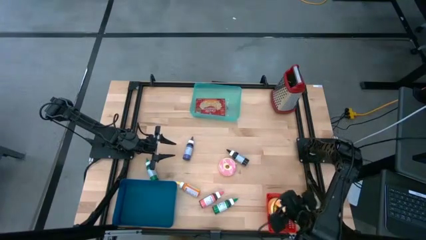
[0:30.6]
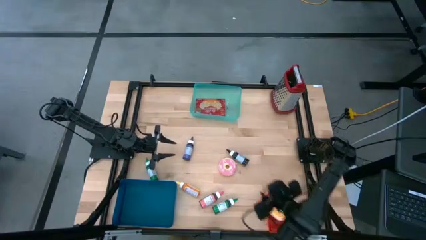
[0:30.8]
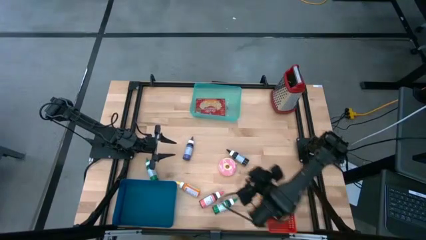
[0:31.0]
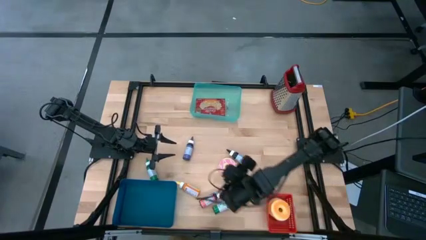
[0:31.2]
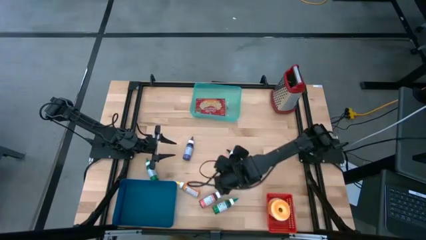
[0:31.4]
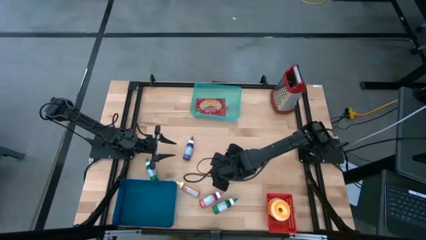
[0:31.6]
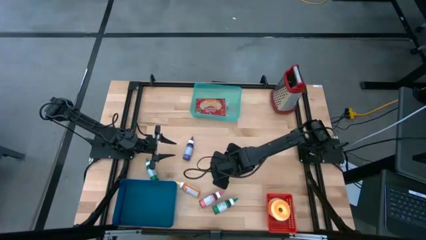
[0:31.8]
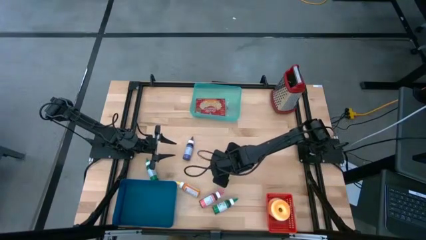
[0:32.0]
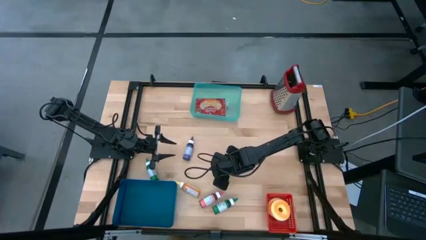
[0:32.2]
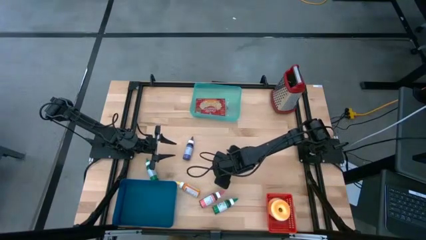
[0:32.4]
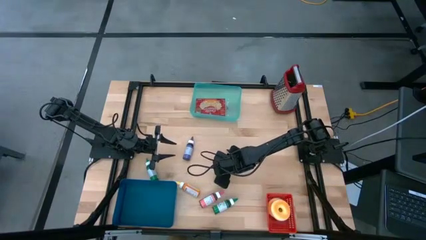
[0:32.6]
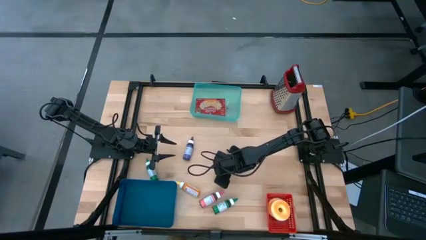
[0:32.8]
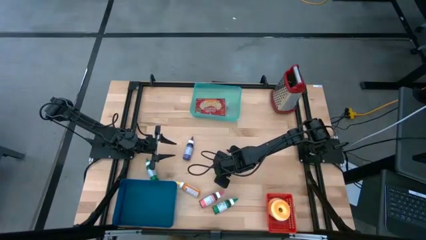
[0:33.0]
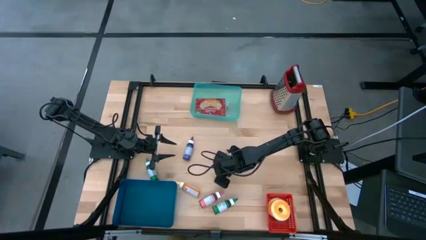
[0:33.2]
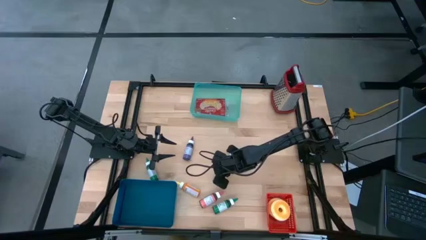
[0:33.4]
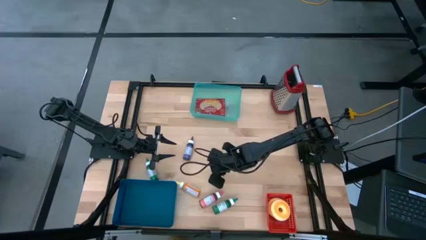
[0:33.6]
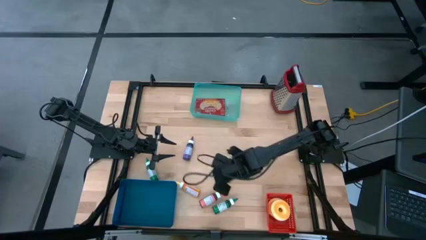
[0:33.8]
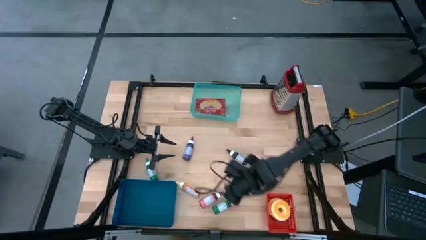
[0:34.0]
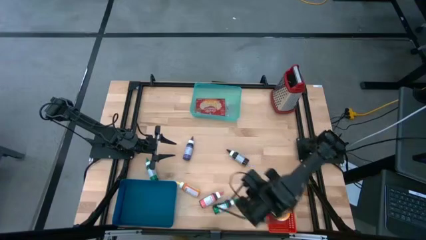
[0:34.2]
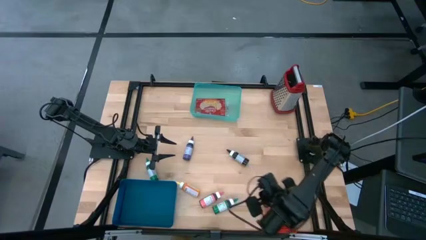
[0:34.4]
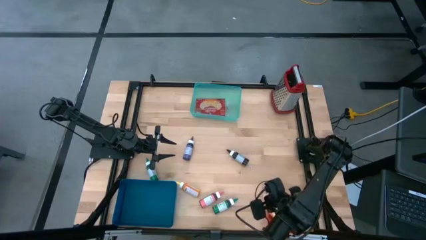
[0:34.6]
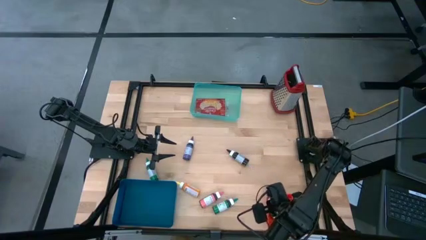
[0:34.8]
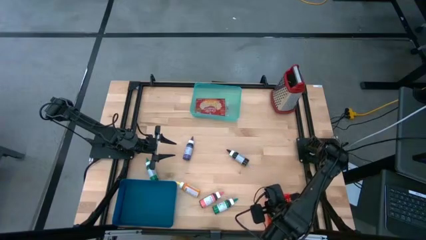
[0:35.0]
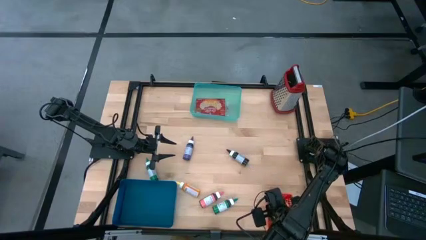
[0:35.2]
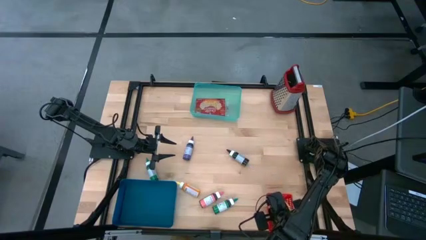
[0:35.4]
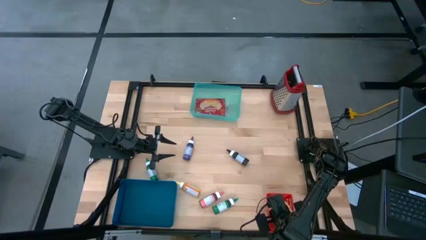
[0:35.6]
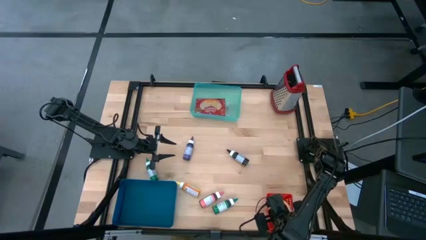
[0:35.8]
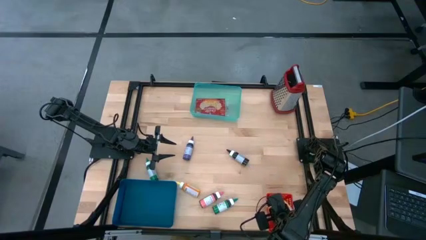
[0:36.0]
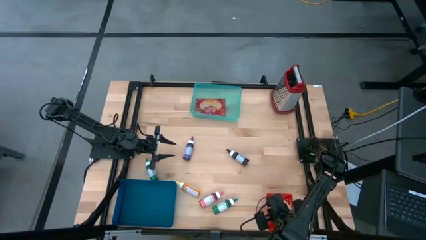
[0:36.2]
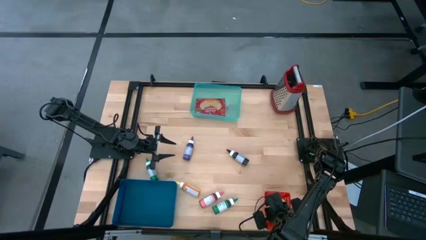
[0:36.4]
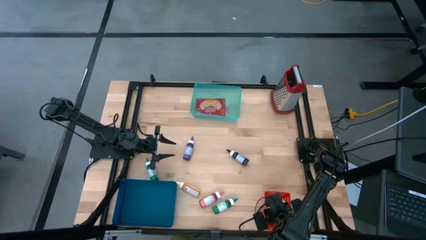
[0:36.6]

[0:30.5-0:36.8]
Put the pink donut into the red bin

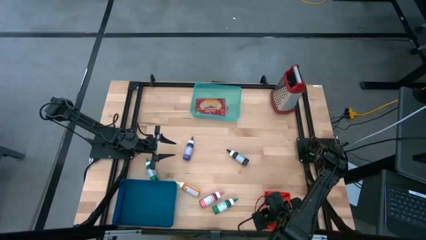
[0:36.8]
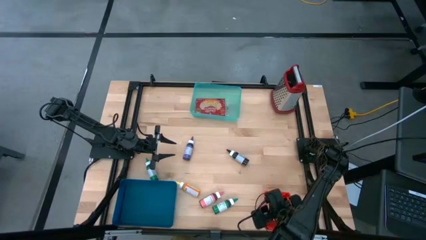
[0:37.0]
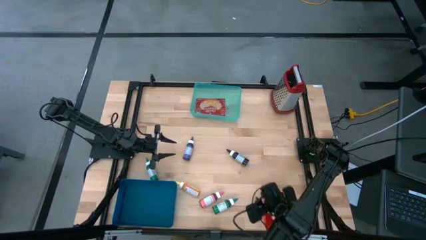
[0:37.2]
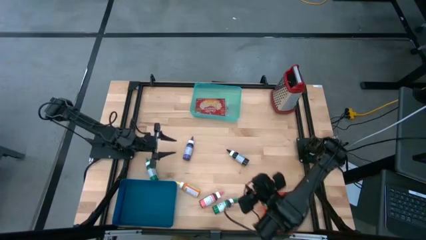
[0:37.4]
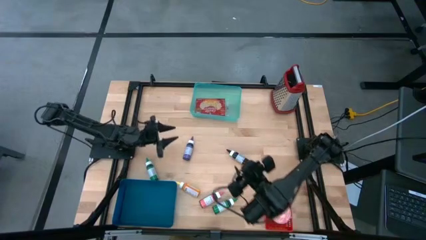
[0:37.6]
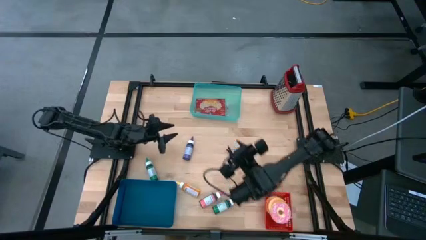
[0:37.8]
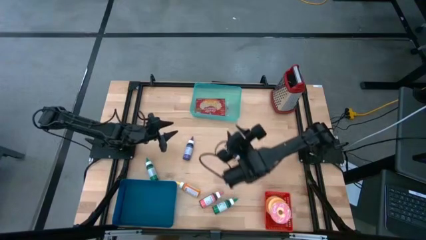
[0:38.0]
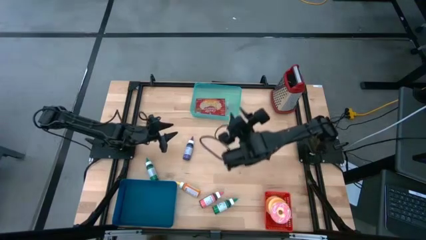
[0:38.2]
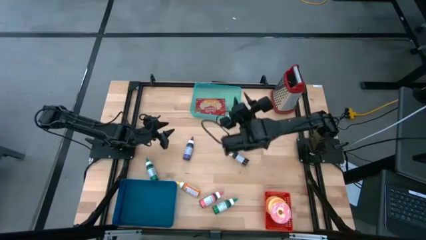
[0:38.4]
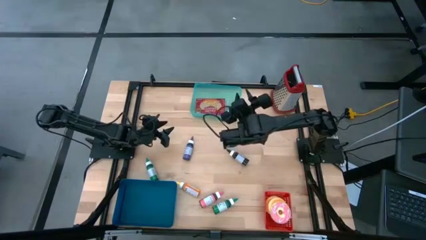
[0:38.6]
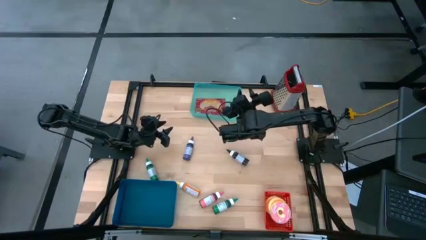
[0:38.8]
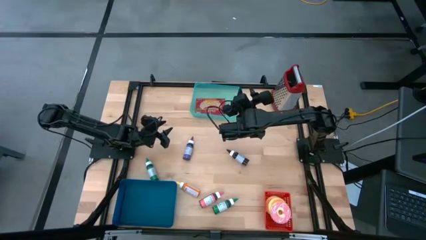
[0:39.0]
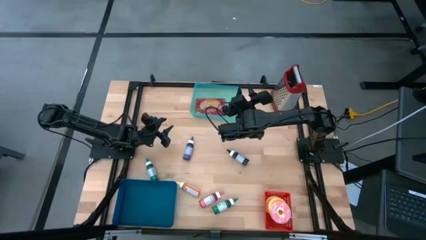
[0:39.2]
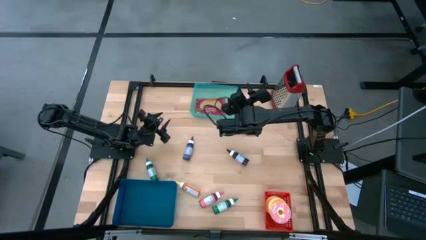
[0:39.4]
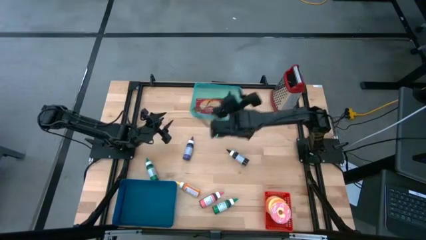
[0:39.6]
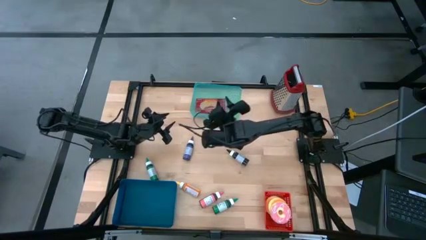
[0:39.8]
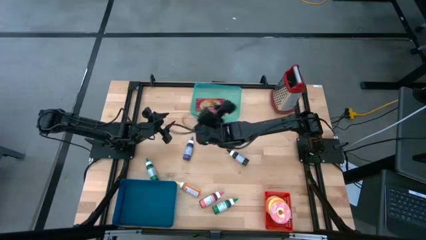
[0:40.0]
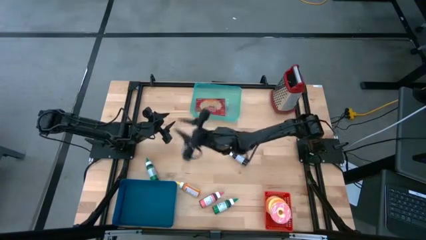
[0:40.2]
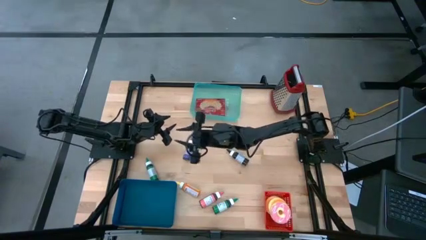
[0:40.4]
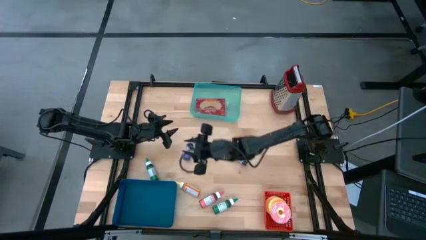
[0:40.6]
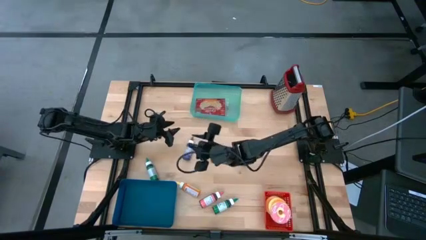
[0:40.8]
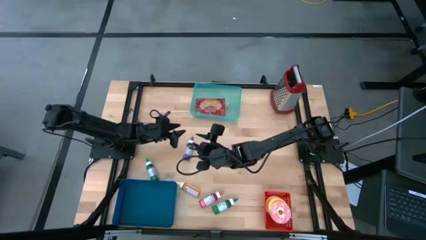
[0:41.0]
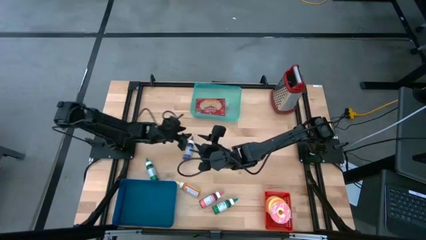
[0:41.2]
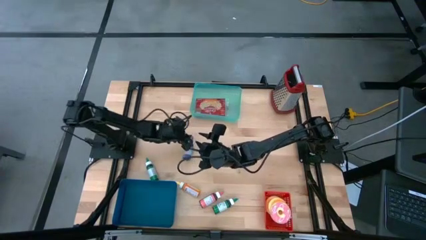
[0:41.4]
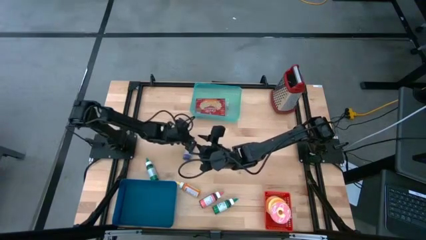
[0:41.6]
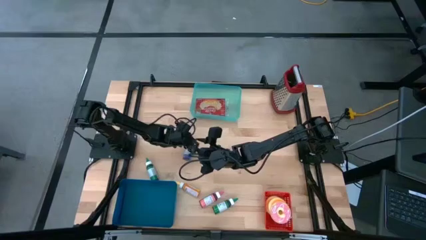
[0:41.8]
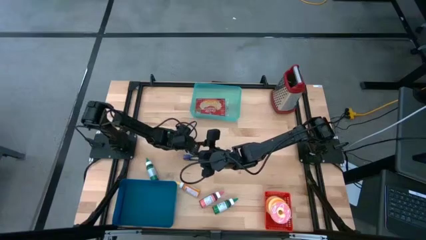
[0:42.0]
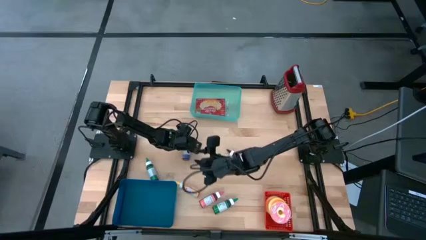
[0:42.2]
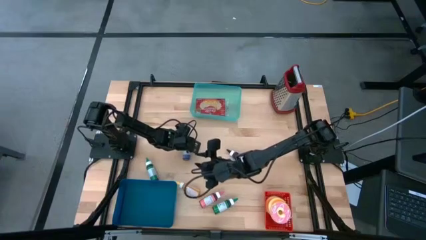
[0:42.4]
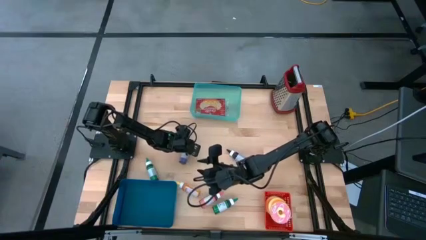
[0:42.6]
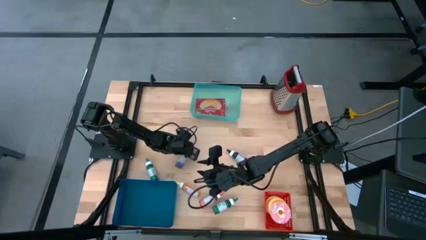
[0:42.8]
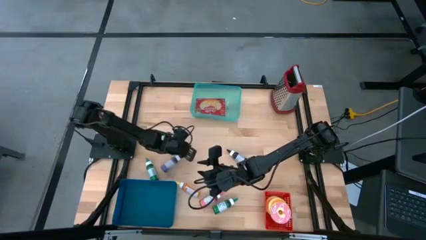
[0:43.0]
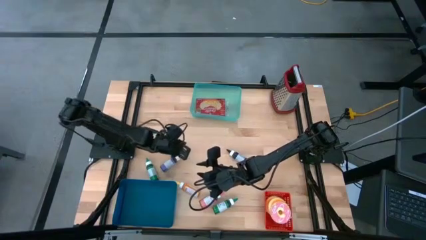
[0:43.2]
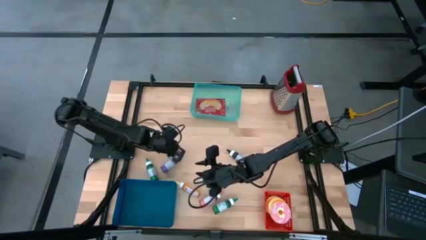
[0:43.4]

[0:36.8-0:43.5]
Put the purple food coloring bottle into the dark blue bin

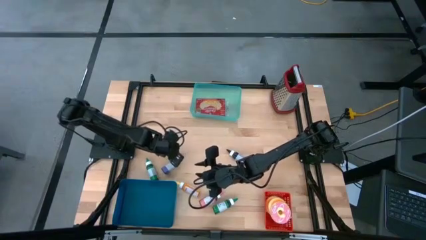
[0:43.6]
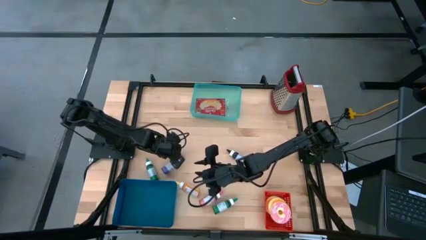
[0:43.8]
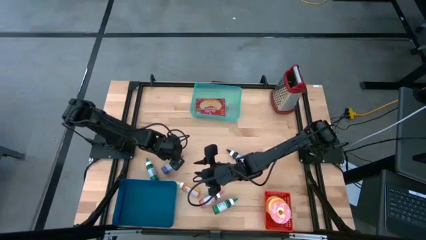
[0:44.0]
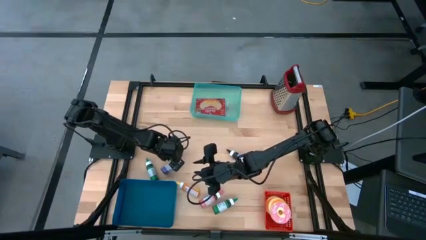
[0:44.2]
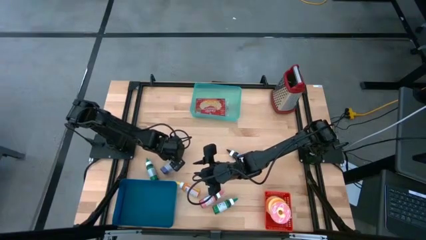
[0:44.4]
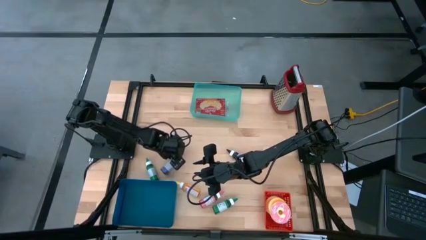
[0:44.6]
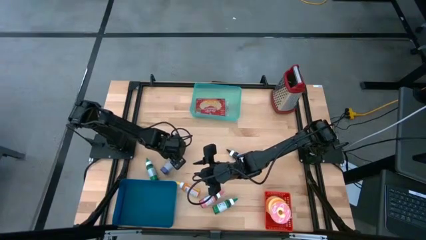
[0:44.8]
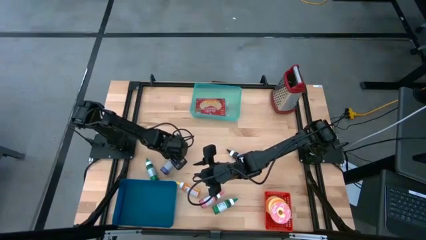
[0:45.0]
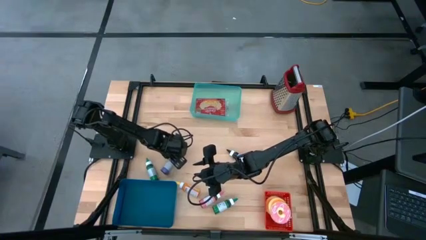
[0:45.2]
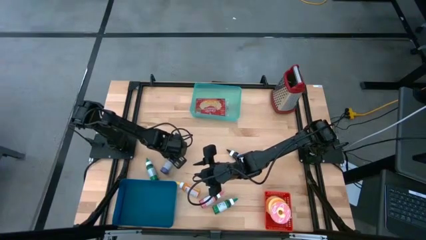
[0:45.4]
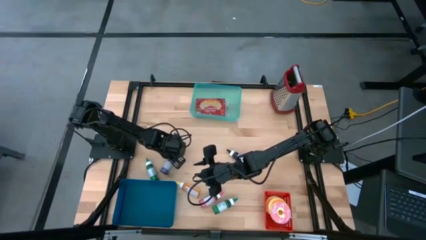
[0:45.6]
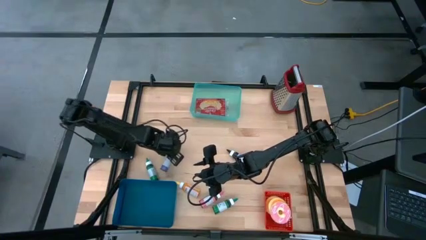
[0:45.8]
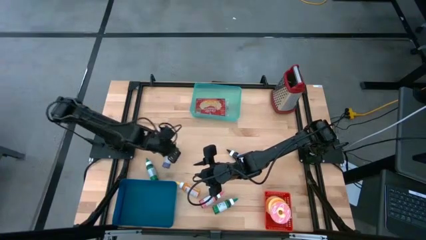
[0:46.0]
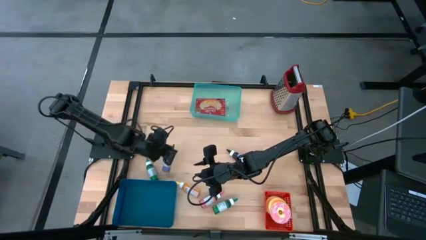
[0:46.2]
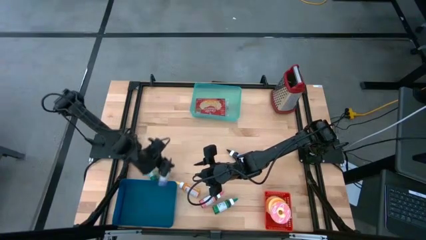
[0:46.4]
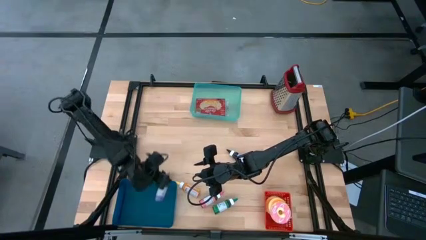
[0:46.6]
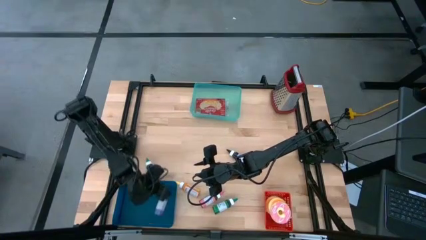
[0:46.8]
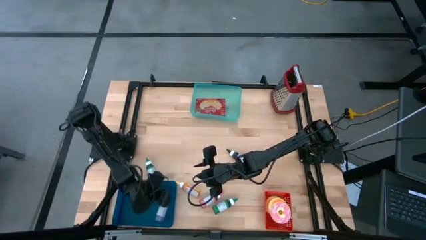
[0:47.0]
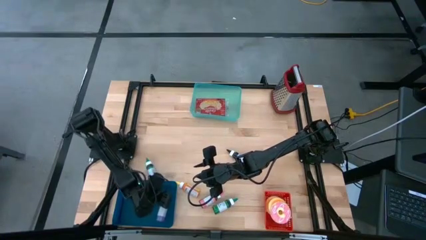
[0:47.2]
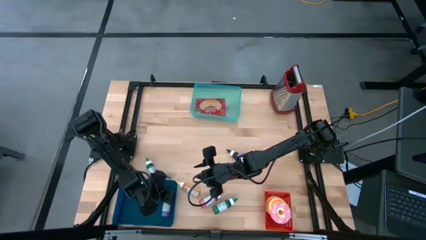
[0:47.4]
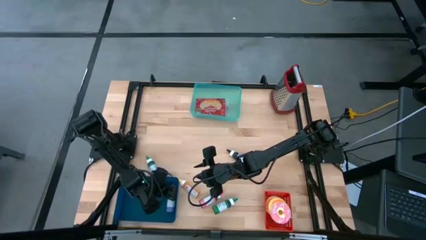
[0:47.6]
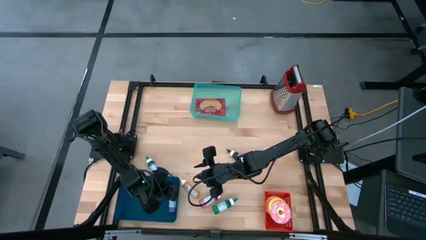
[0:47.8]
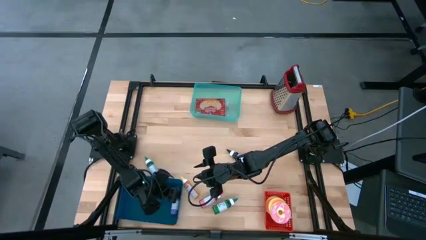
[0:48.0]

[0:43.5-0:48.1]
Put the purple food coloring bottle into the dark blue bin
